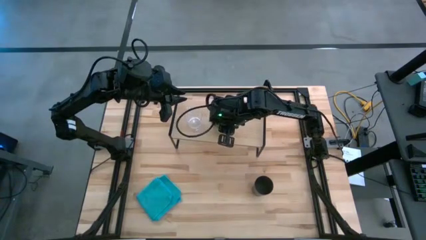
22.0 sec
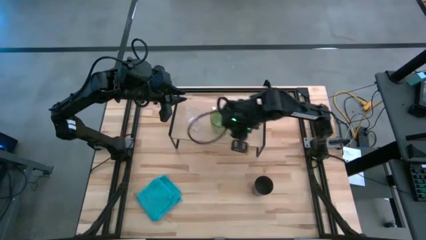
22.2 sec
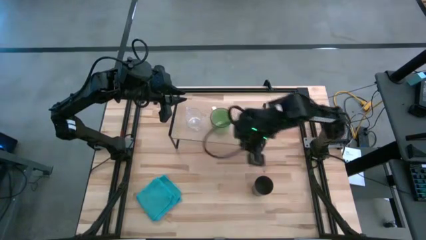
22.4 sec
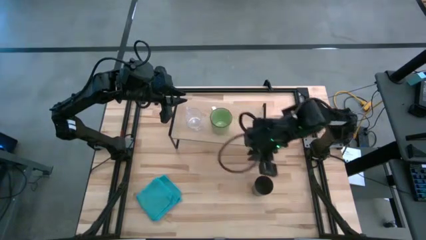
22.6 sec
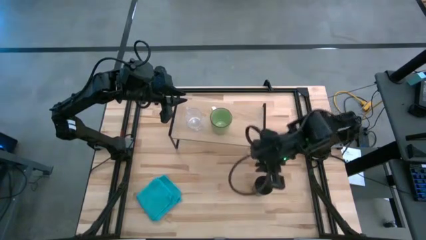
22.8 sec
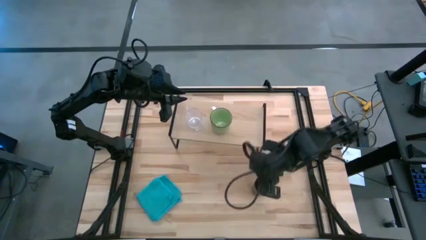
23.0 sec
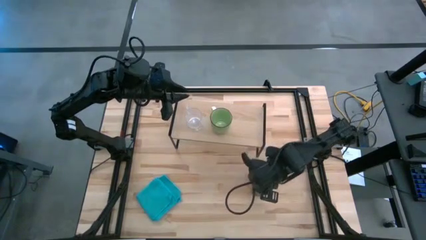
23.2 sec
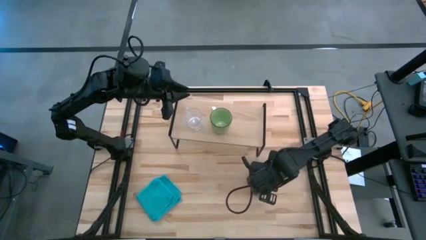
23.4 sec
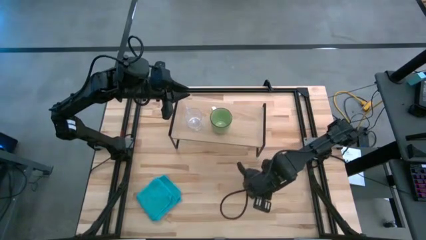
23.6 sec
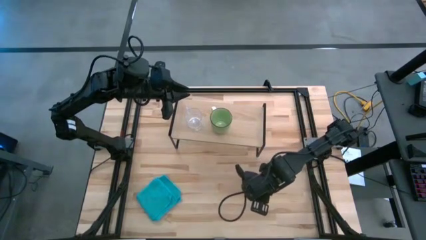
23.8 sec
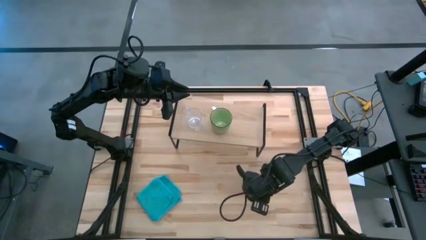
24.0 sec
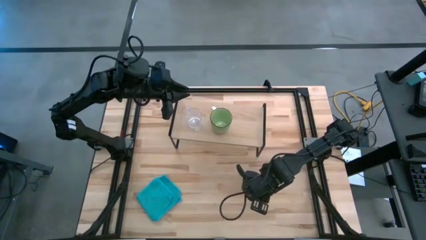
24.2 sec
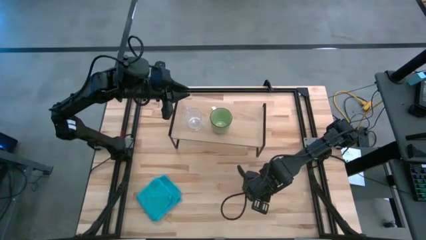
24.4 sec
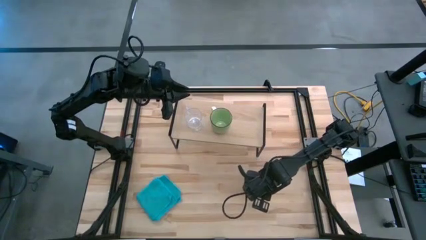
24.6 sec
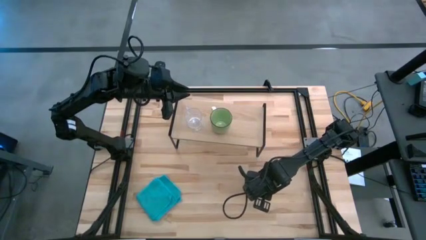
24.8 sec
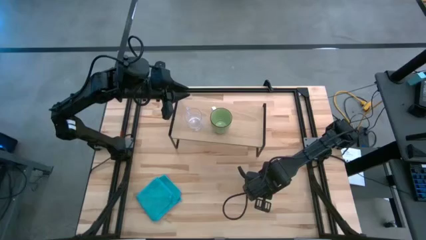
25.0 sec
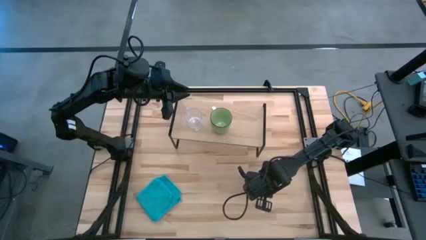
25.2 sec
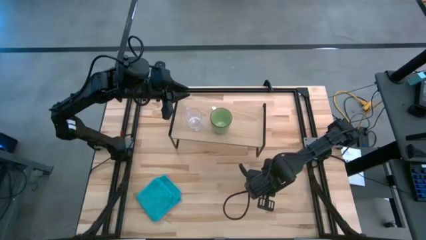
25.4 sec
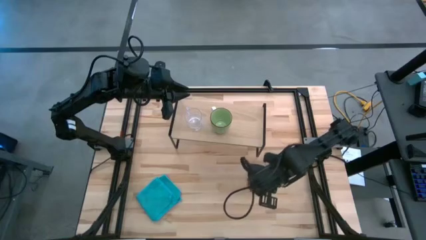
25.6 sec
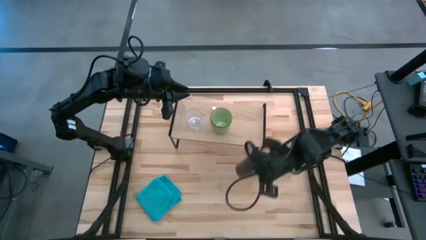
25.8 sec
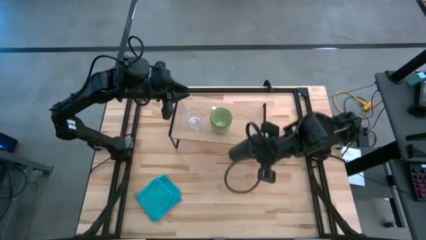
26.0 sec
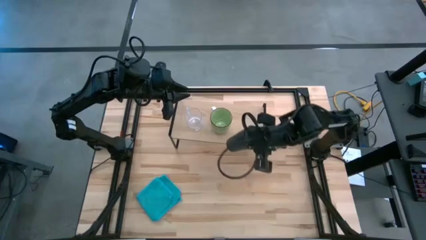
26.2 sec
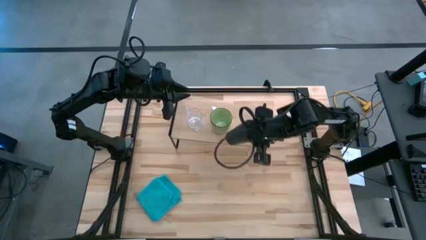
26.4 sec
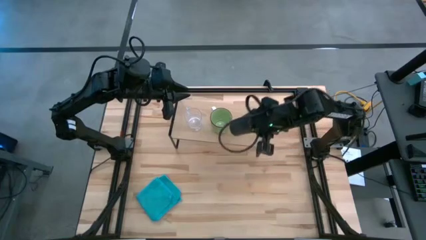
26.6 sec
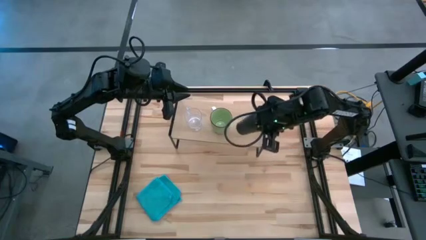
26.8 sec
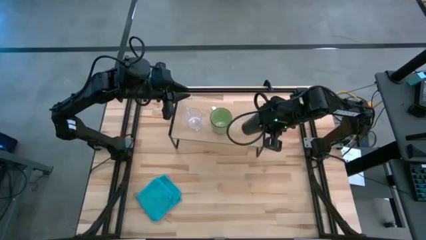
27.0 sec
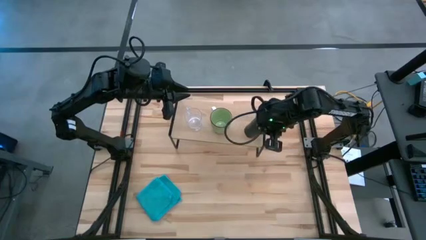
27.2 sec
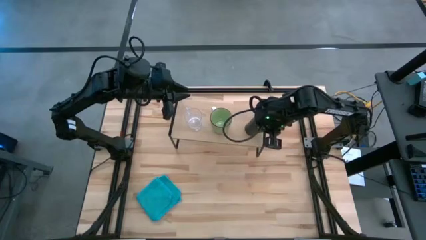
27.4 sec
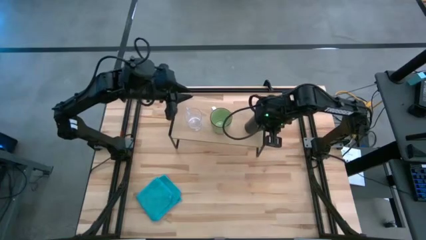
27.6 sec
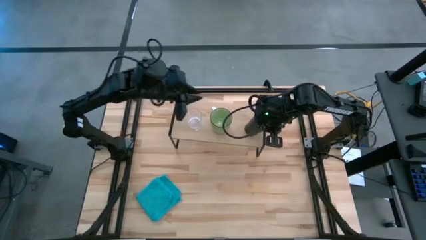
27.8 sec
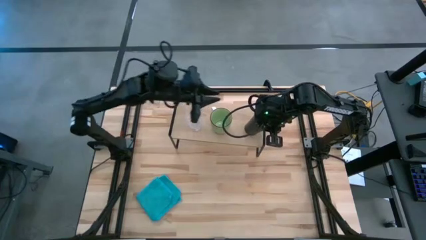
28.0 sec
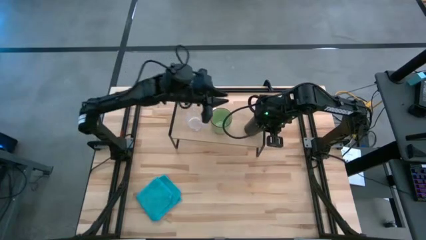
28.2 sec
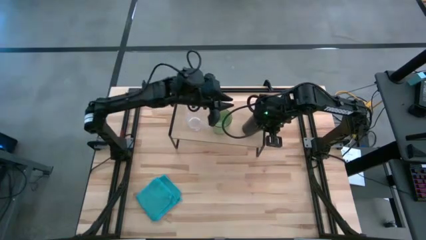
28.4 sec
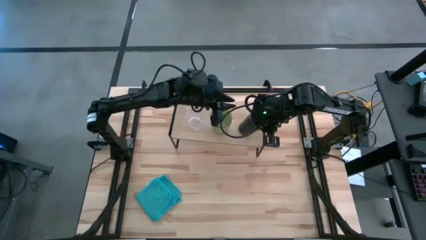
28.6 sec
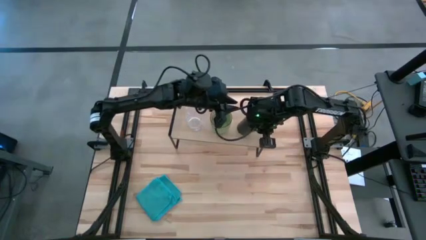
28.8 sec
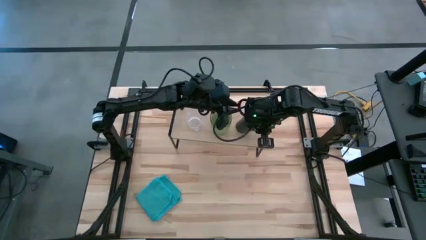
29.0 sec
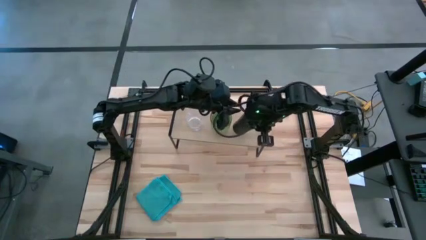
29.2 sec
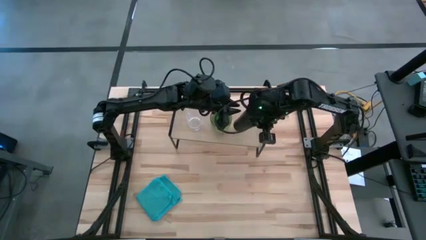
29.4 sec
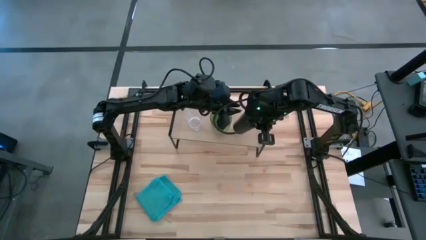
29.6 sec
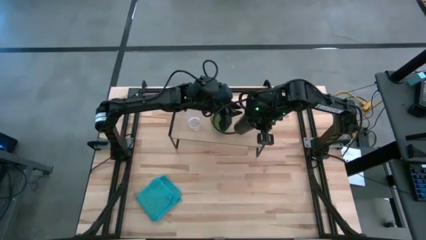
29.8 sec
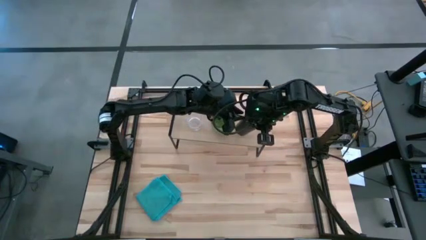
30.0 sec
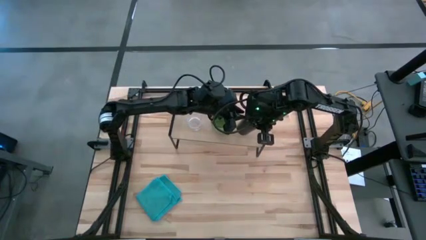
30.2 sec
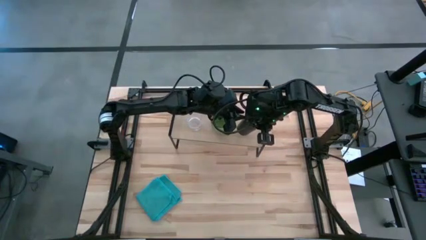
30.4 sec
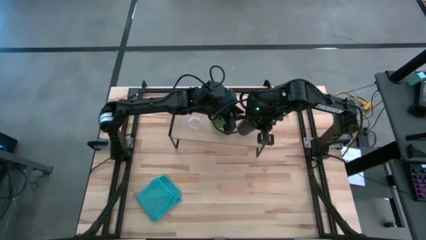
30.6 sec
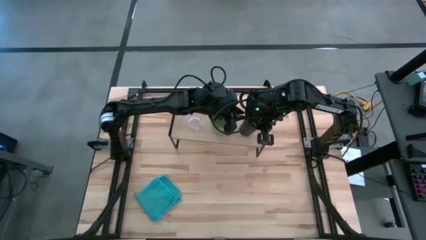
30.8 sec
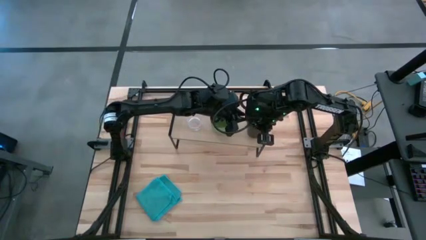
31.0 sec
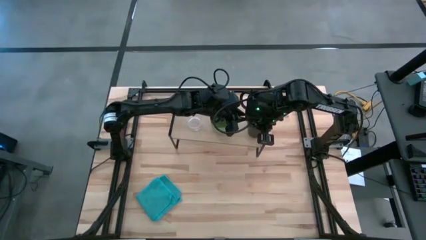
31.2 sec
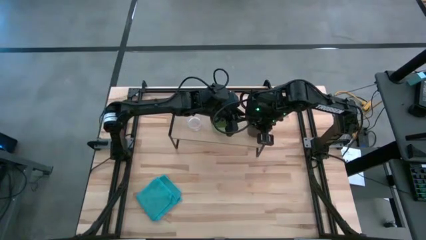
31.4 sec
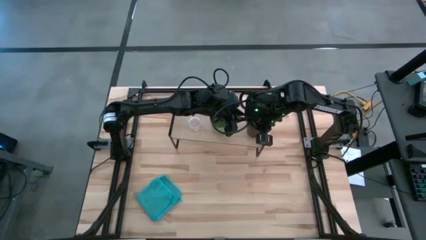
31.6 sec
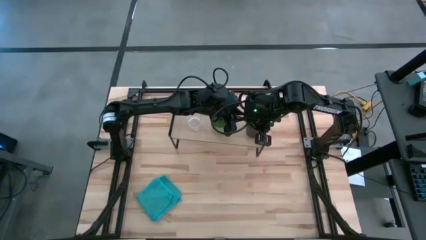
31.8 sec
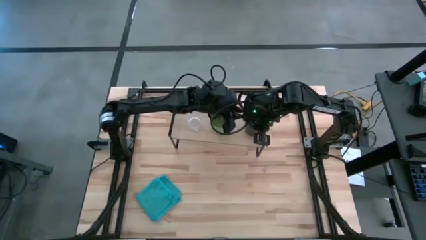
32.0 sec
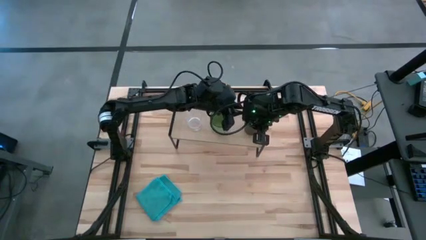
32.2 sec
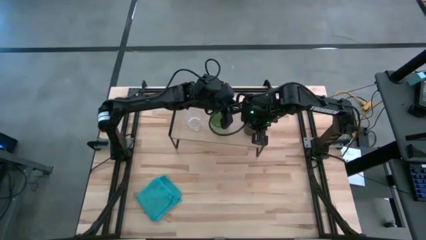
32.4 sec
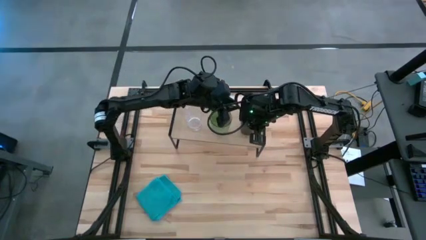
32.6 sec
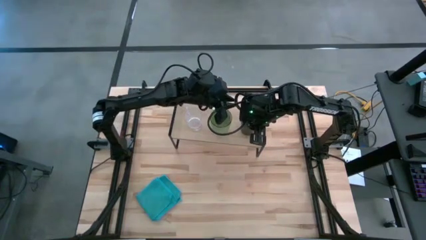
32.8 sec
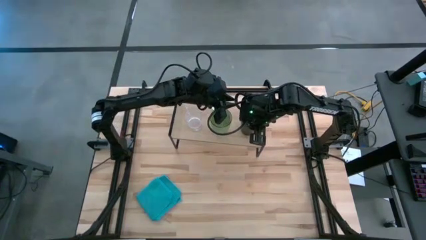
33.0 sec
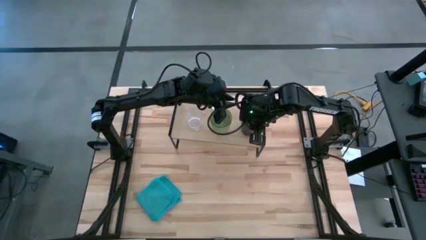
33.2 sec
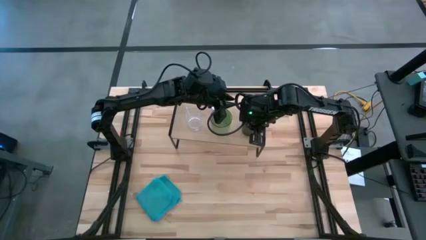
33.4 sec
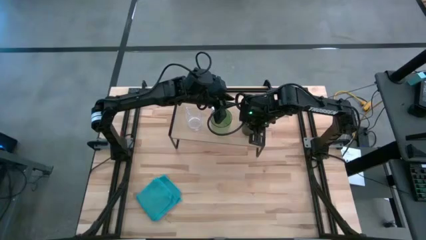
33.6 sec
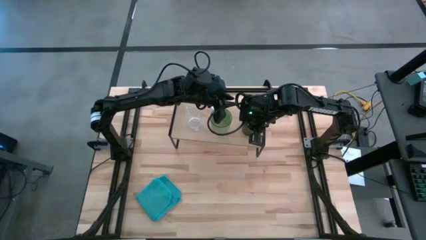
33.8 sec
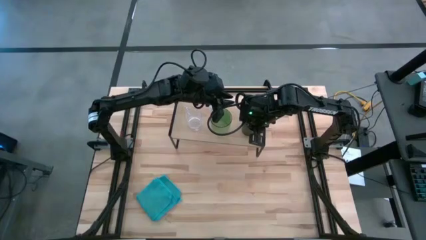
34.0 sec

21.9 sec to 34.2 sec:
Task: Stack small to large cups/mugs on shelf
Put the black cup on the shelf
